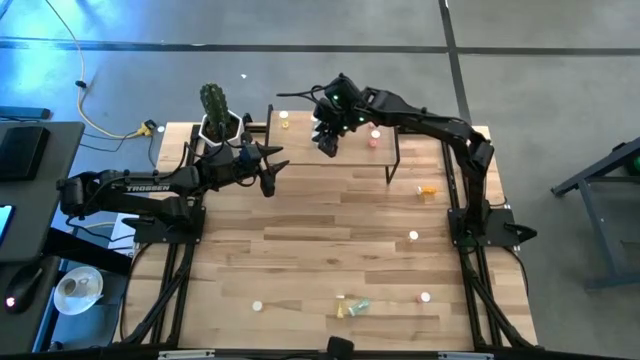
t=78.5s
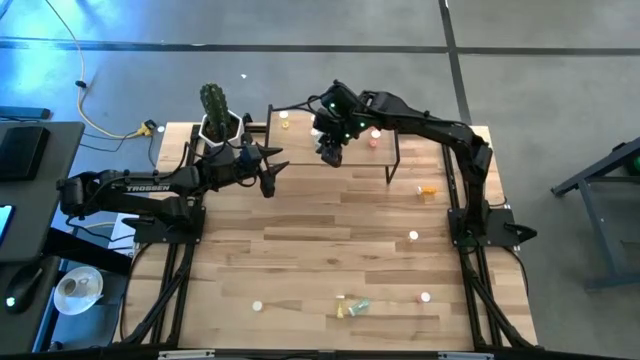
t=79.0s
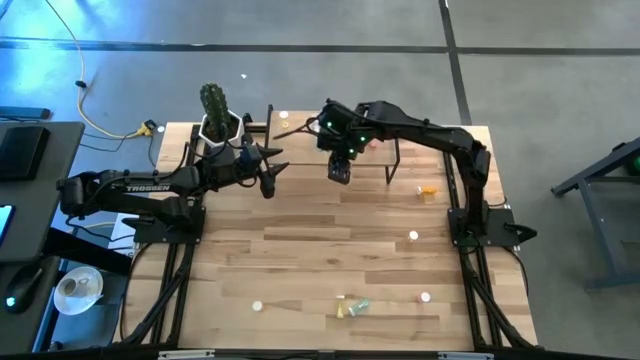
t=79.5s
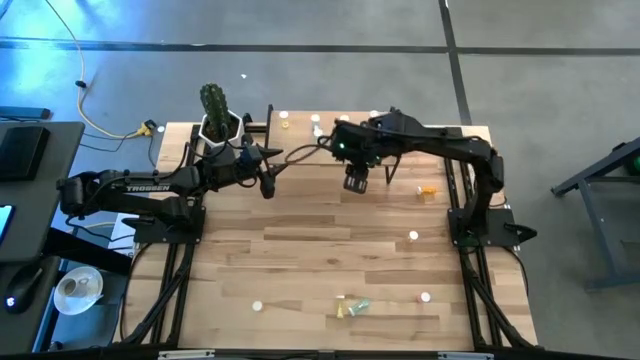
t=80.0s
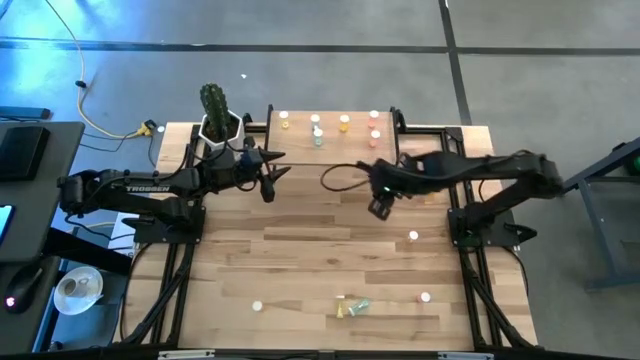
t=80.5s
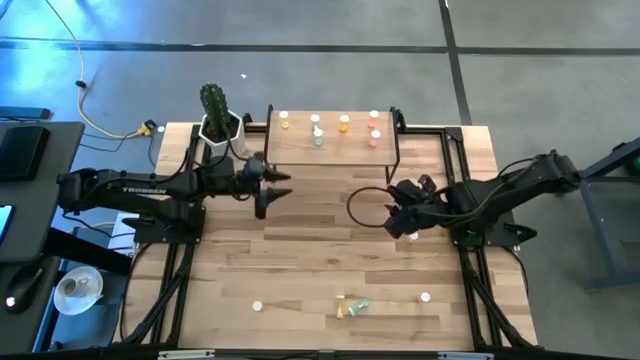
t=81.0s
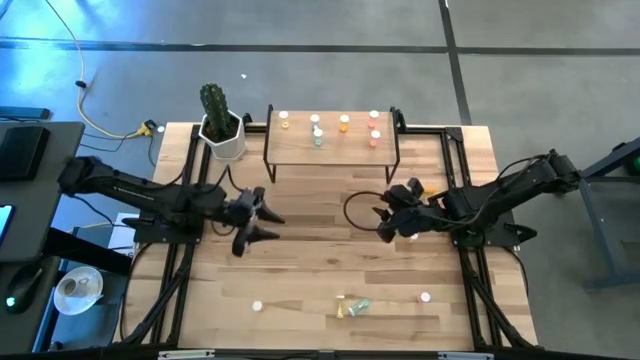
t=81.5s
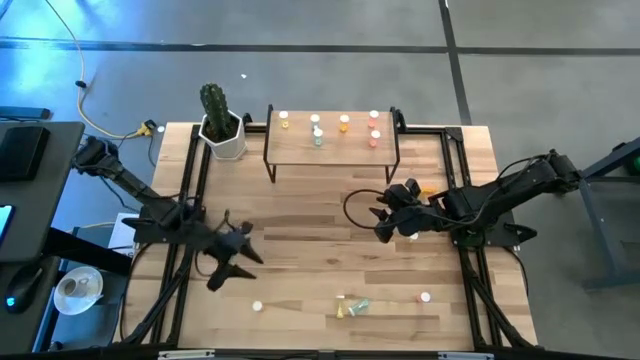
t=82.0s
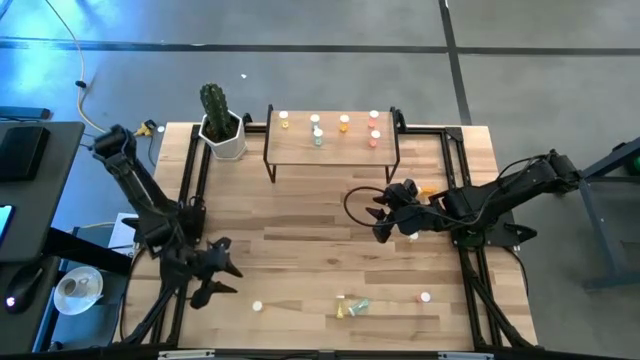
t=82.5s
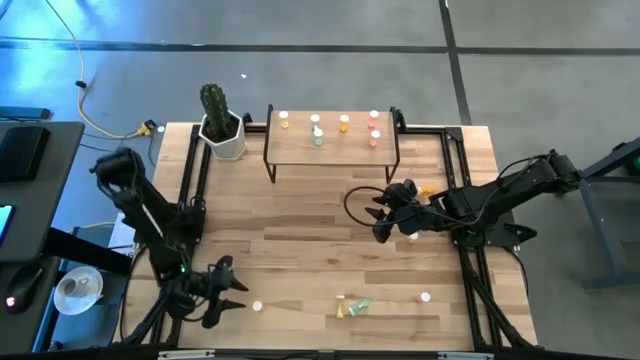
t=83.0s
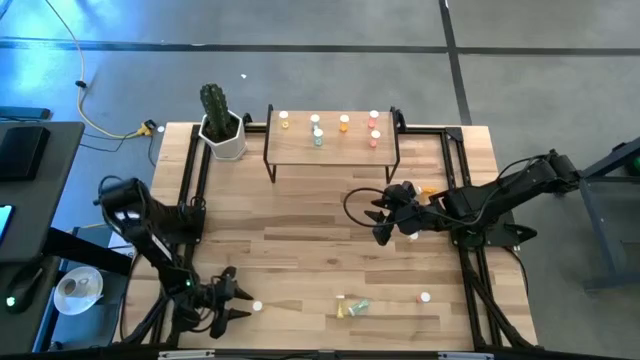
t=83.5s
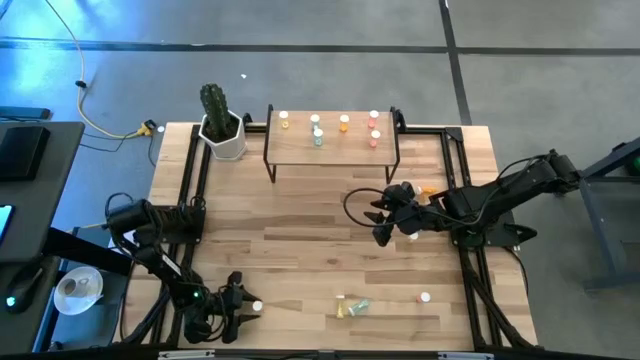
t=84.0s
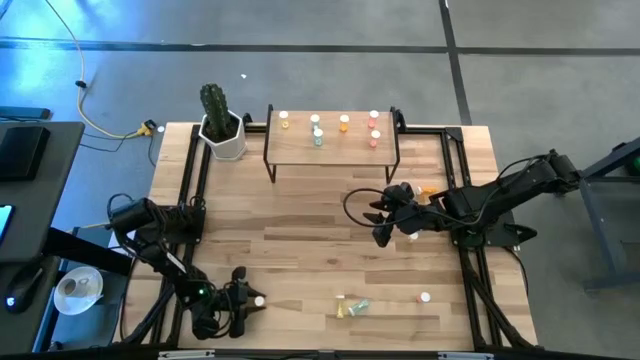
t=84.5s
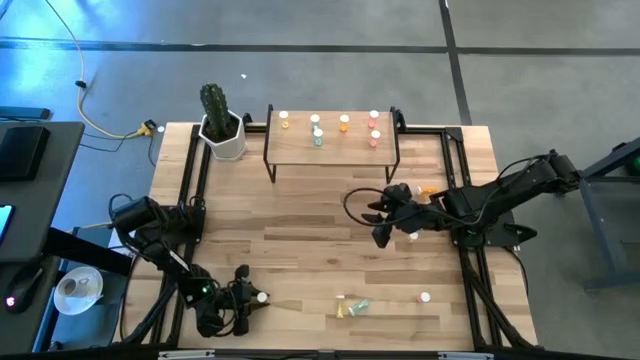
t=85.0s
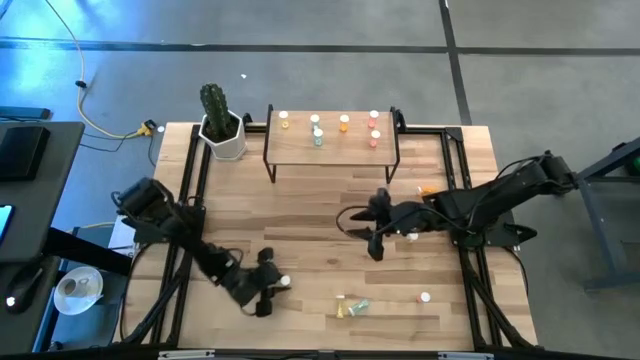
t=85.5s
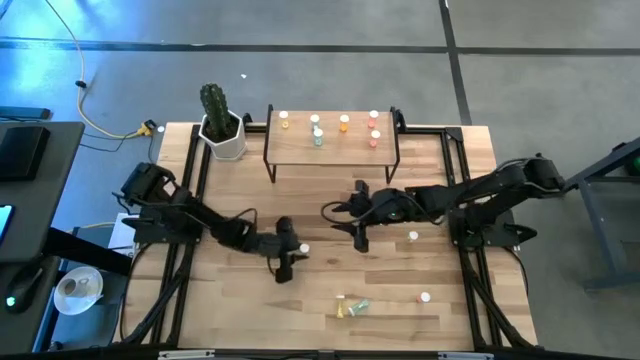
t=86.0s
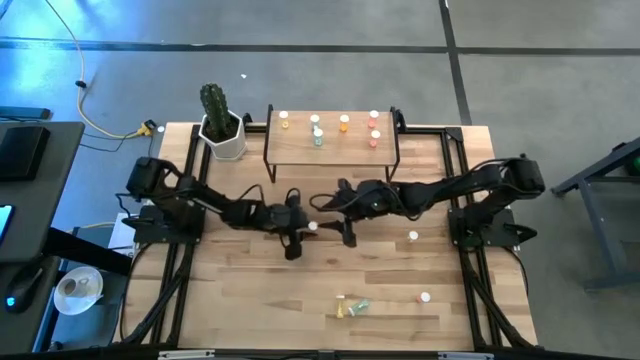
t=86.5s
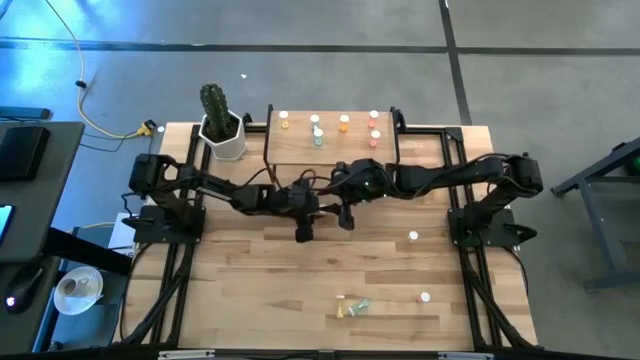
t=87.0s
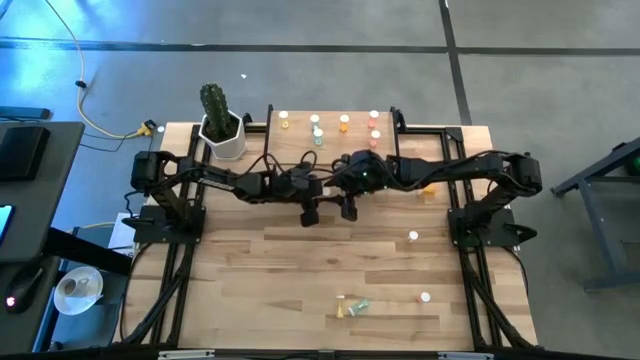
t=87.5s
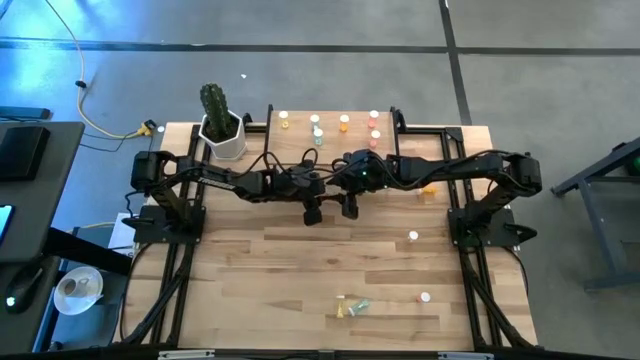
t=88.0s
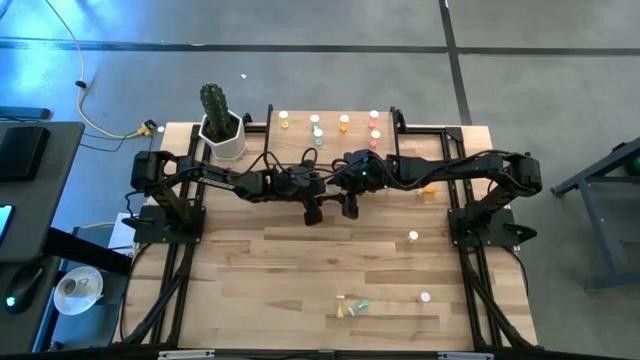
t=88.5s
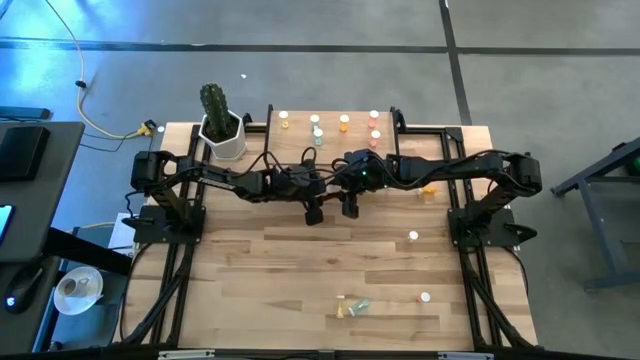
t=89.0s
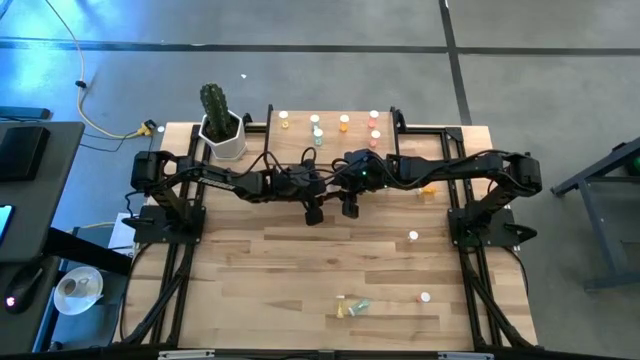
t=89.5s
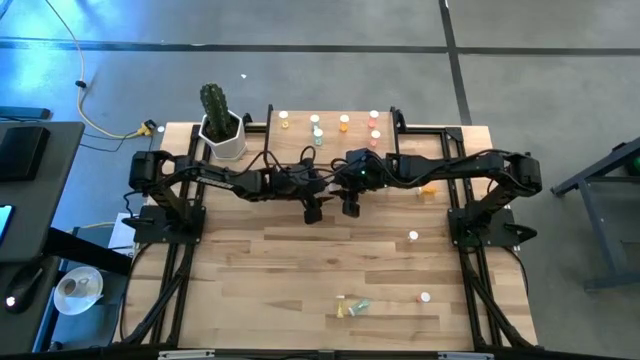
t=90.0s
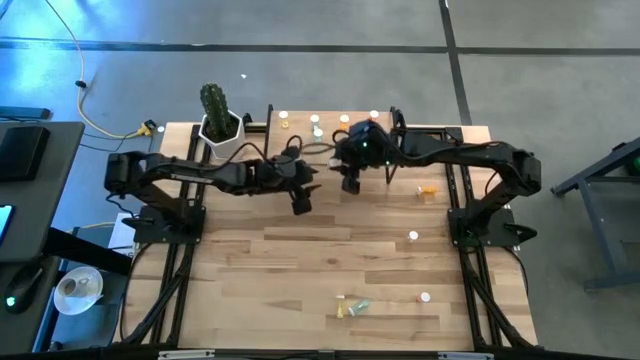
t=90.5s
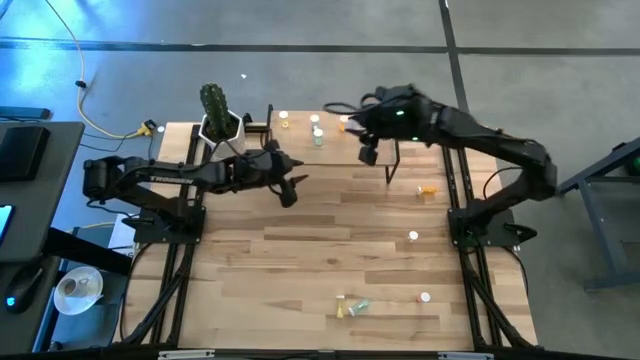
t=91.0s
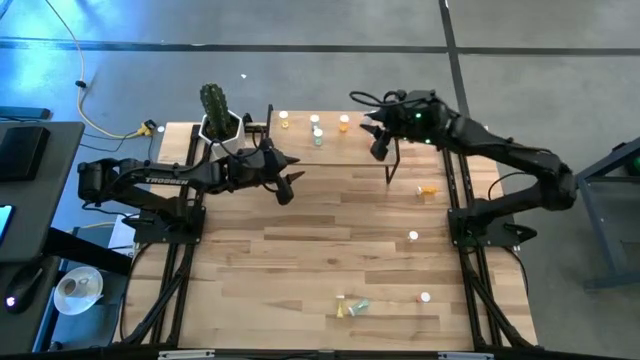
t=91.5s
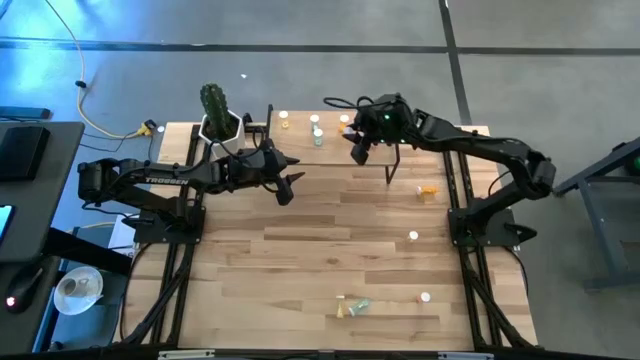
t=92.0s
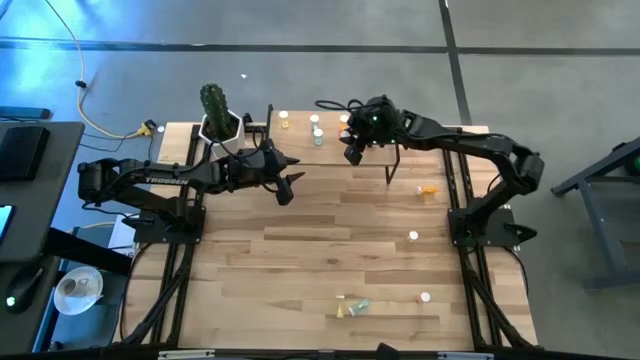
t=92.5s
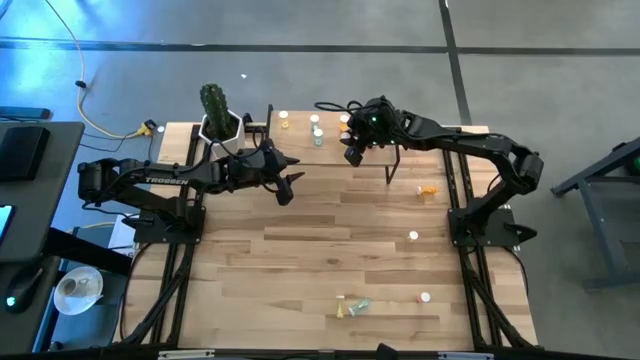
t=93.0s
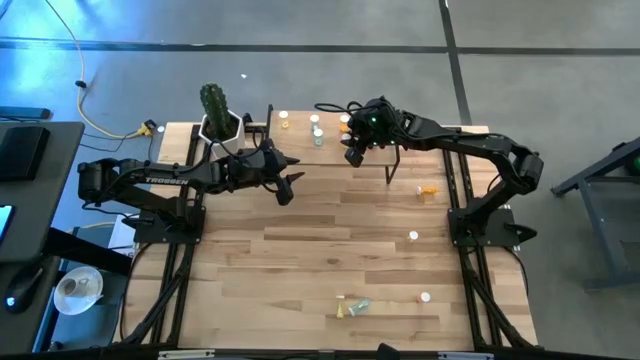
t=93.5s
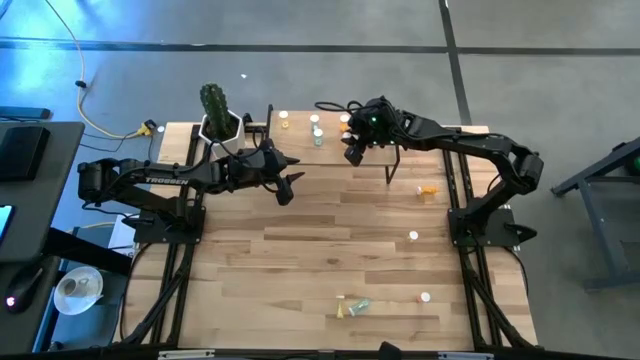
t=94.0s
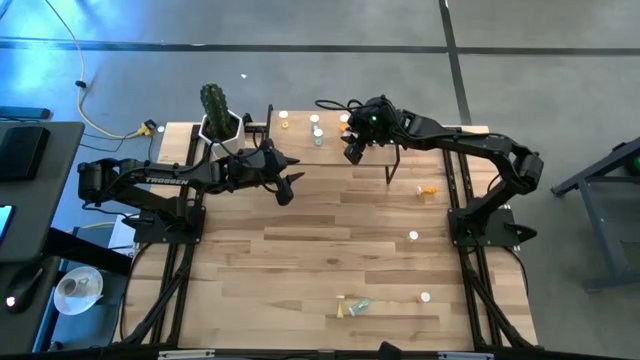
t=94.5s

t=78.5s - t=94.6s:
Task: Pick and place medicine bottles onto shelf by color
Put the bottom orange pill bottle on the shelf aligned with the other orange pill bottle

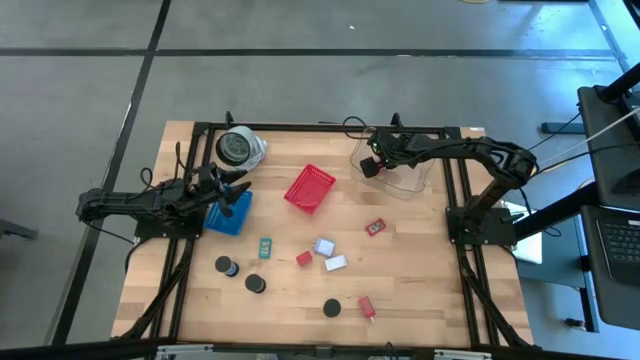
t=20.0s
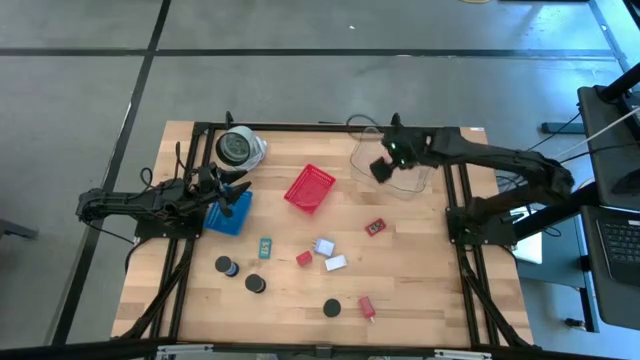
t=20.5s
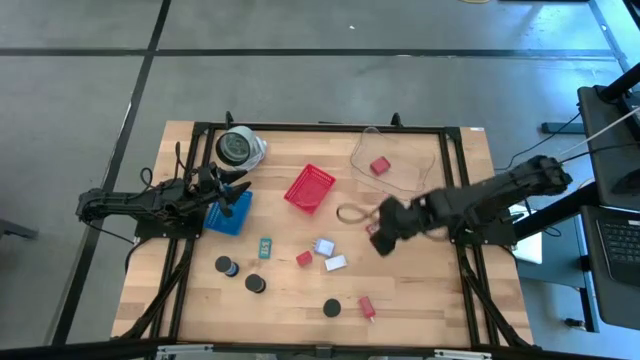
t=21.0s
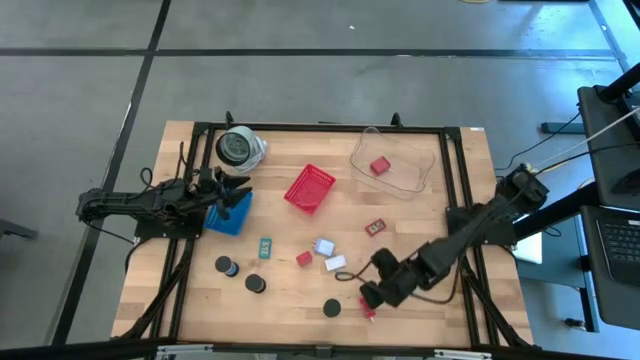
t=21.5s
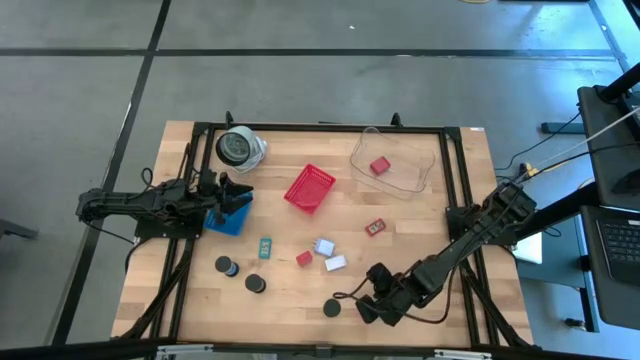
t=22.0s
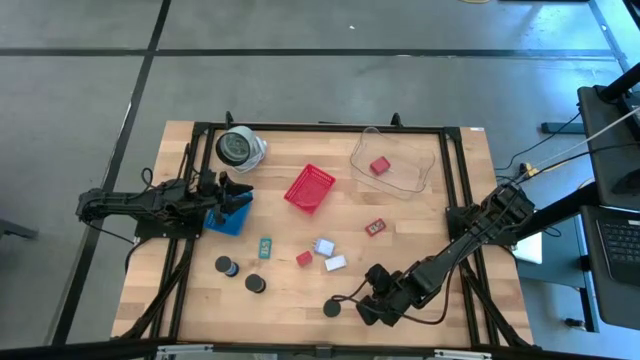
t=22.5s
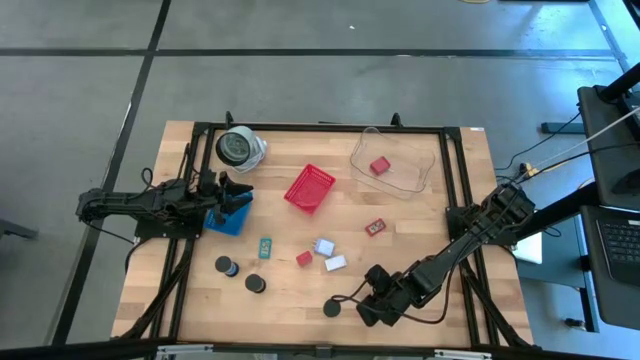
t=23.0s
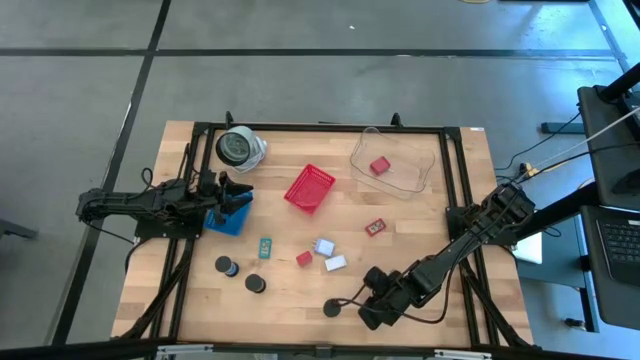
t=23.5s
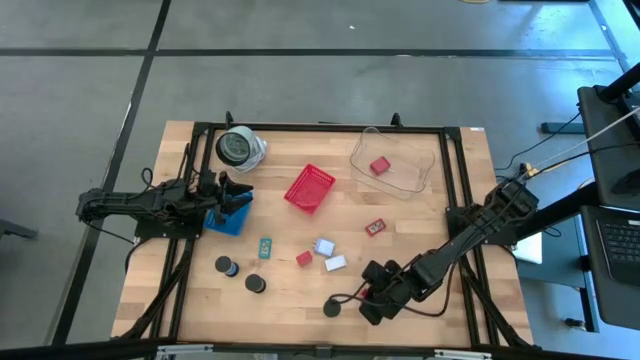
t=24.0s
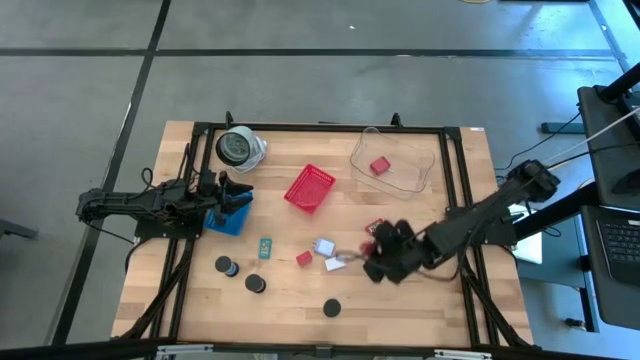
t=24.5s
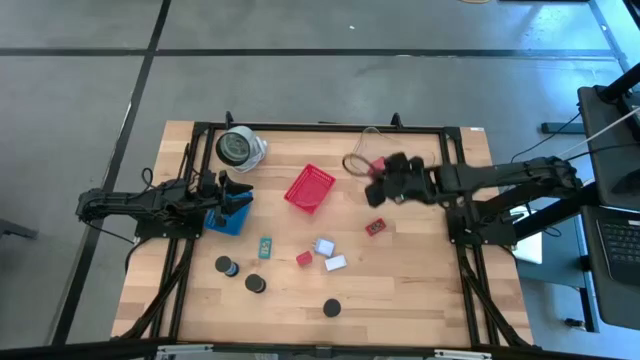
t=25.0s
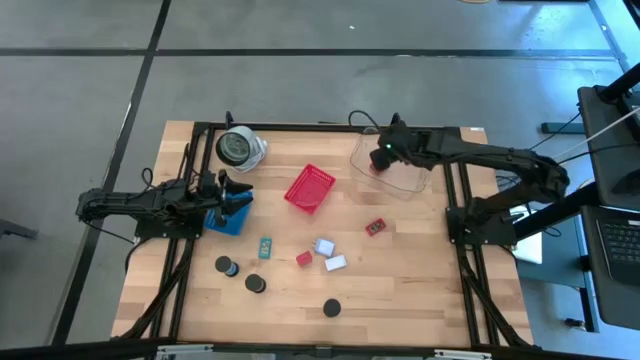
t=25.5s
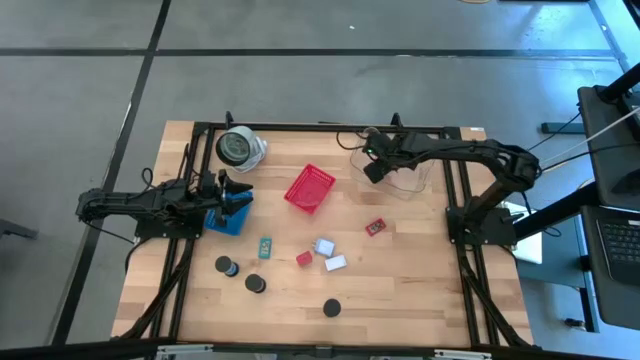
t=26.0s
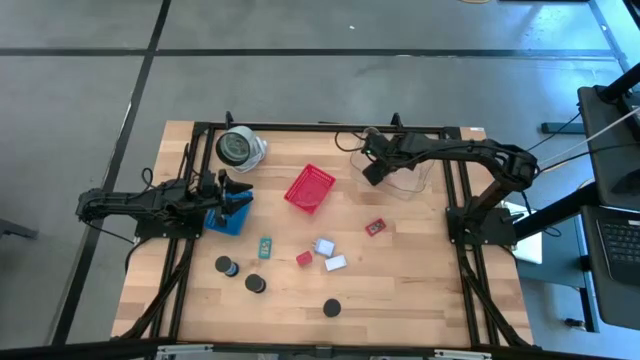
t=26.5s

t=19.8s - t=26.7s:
Task: Pick & Place Office items
Put the bottom red charger adapter into the white bin
